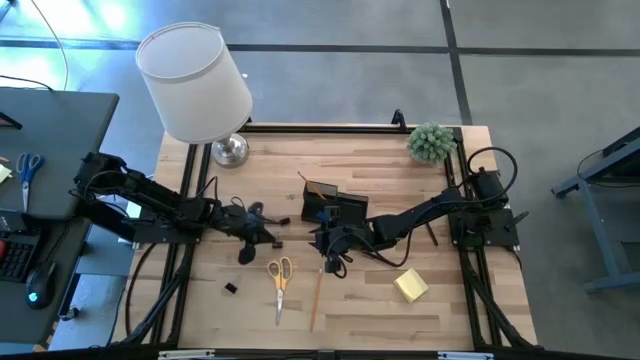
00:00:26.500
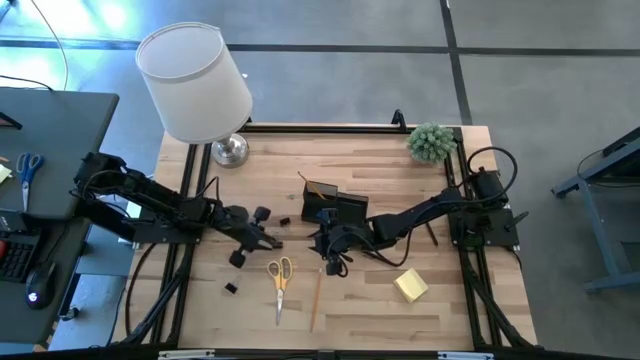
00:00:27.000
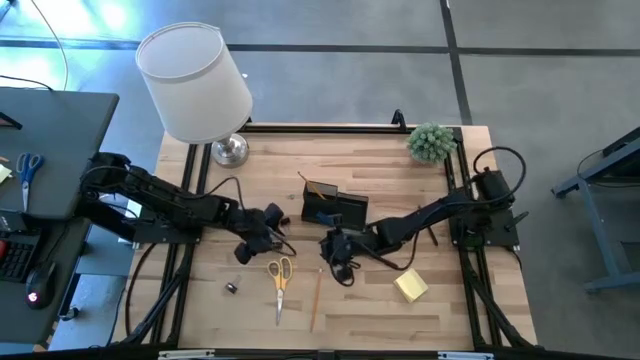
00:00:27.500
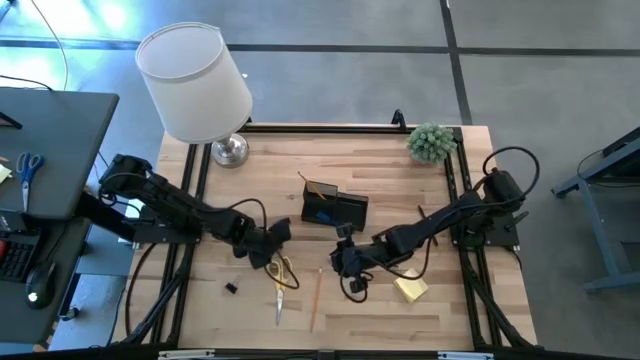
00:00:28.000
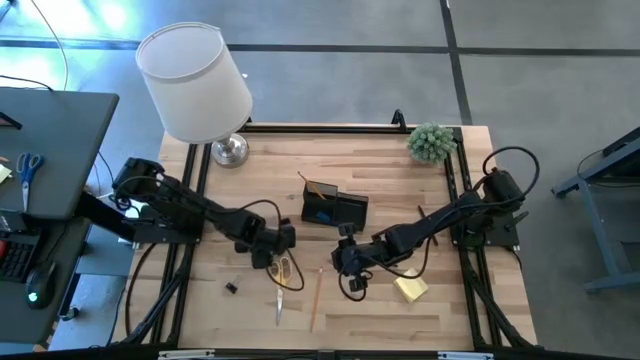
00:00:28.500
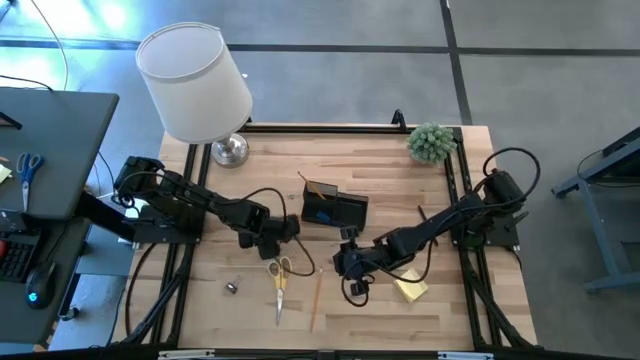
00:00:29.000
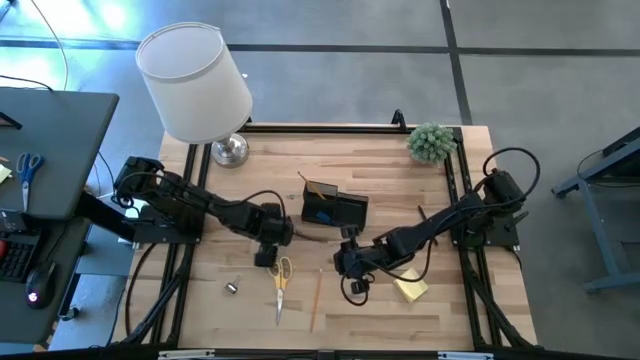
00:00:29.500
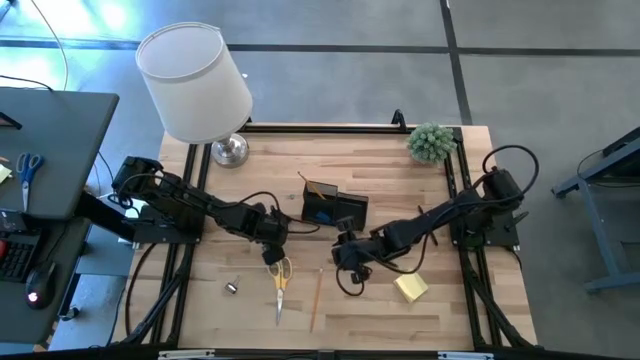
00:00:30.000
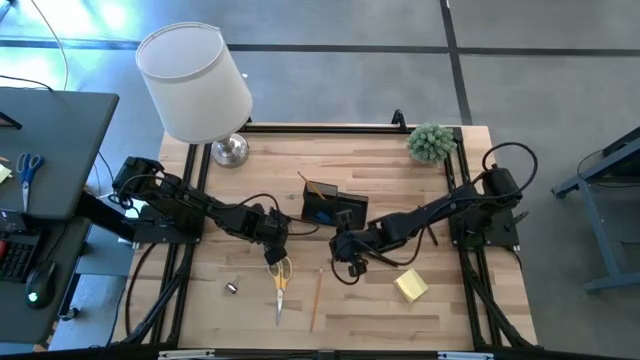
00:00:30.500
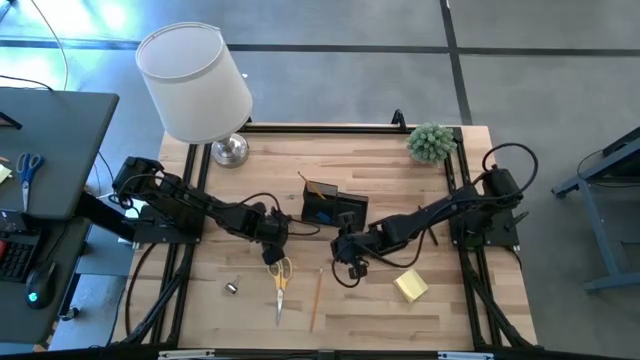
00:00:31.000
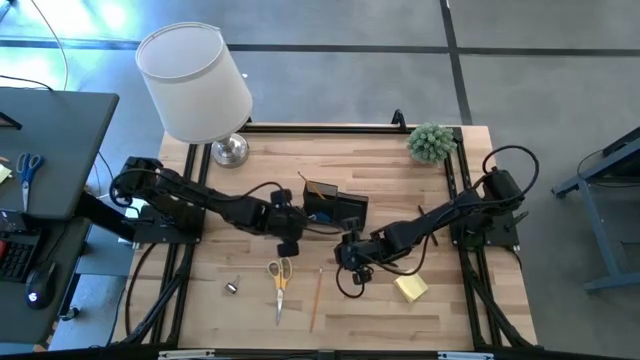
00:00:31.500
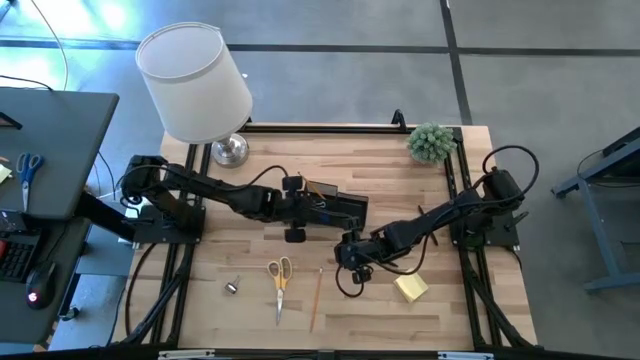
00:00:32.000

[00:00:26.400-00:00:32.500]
Task: Pick and place office supplies into organizer
Put the top left black binder clip into the desk organizer

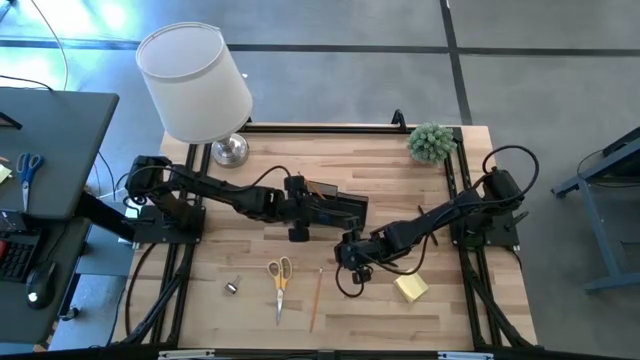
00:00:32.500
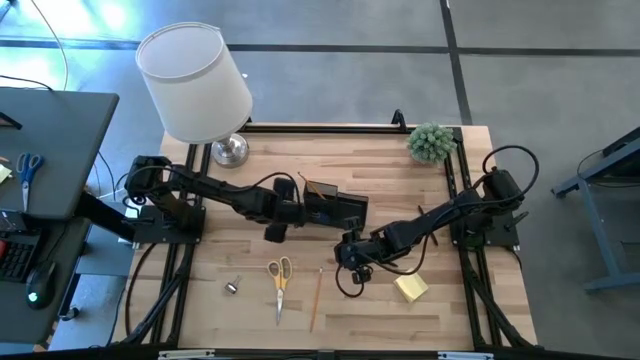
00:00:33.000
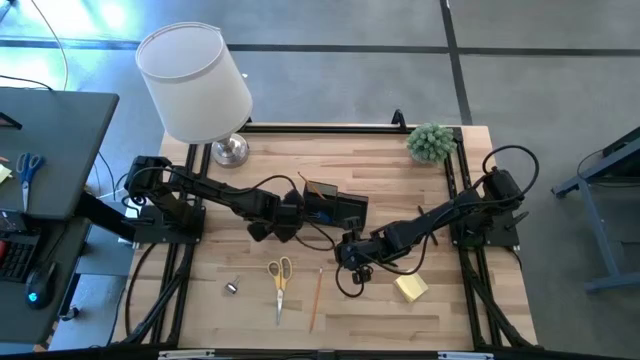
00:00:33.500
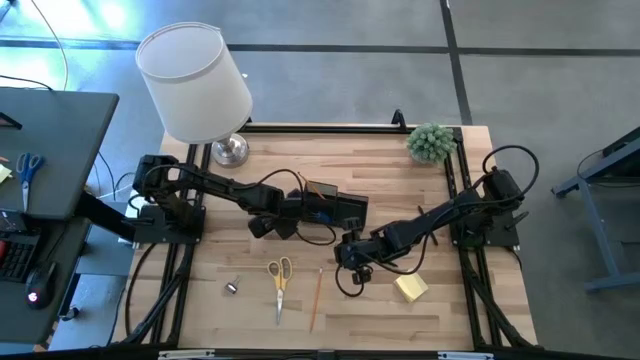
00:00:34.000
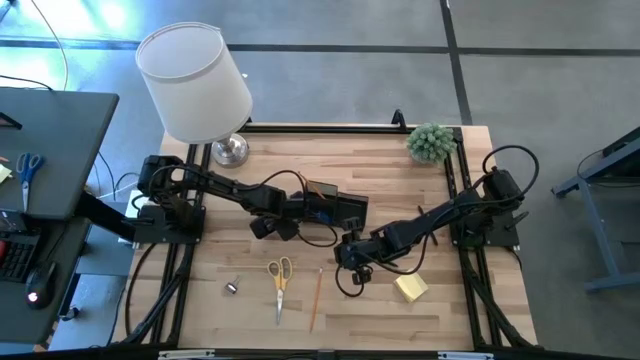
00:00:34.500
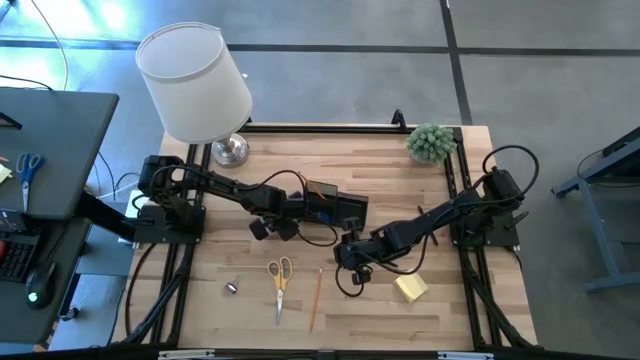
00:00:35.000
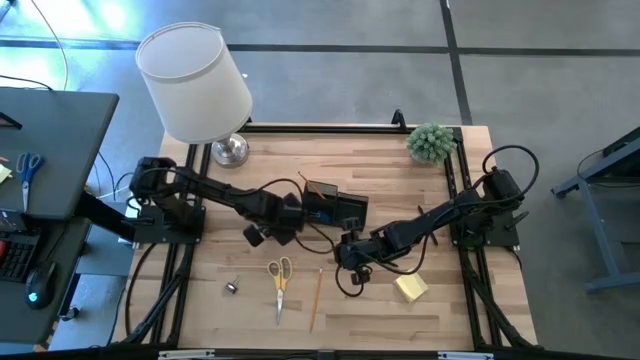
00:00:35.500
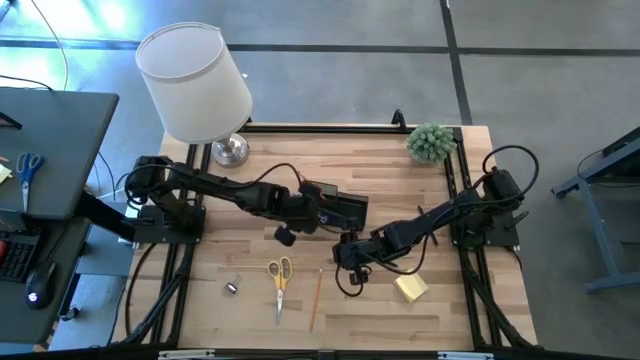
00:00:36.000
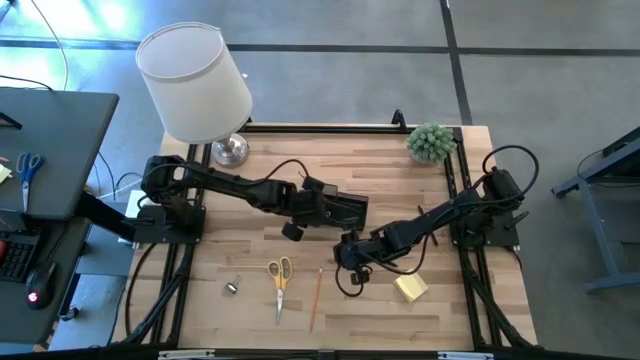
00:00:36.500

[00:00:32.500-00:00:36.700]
Put the top black binder clip into the desk organizer

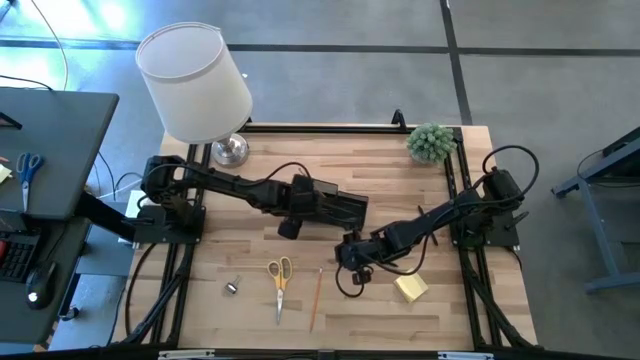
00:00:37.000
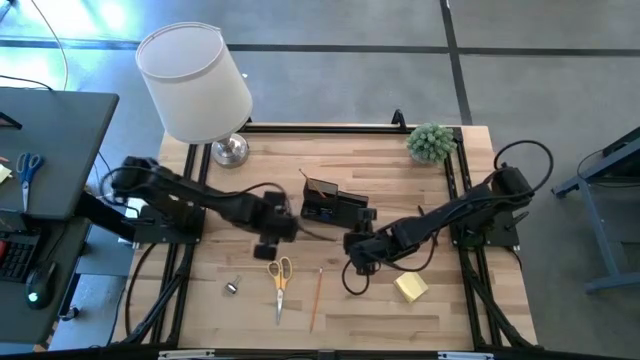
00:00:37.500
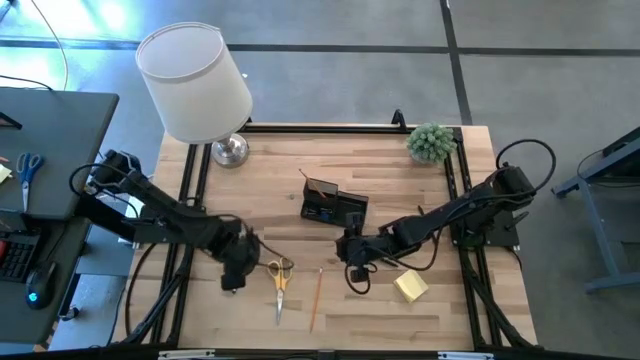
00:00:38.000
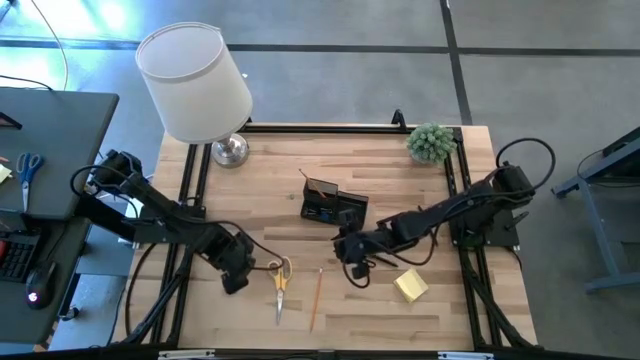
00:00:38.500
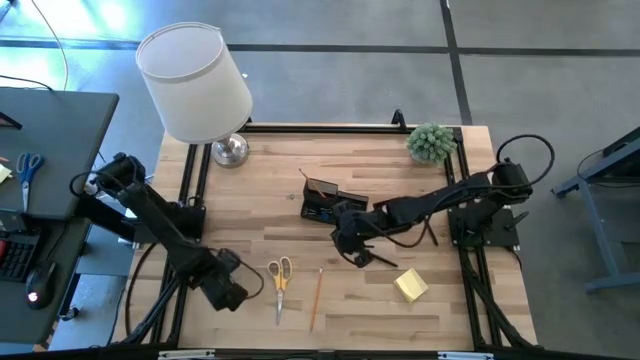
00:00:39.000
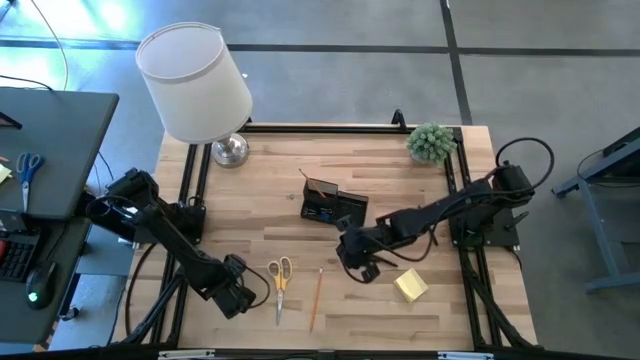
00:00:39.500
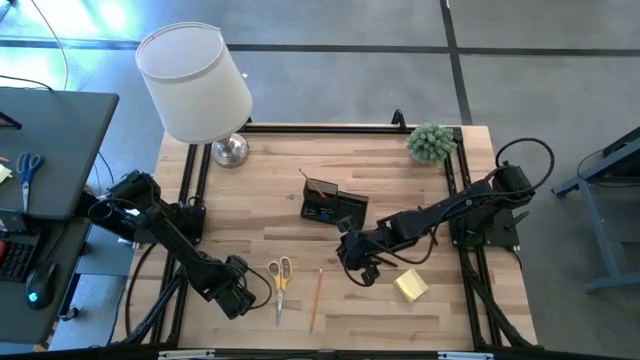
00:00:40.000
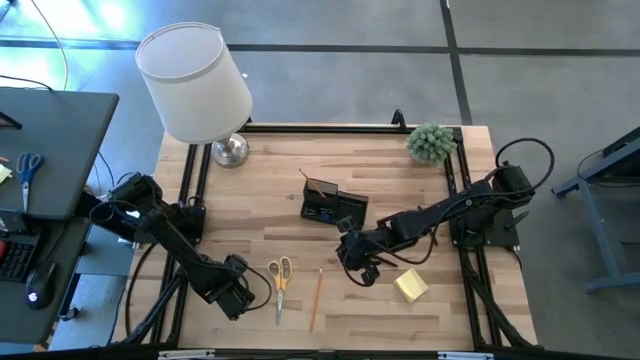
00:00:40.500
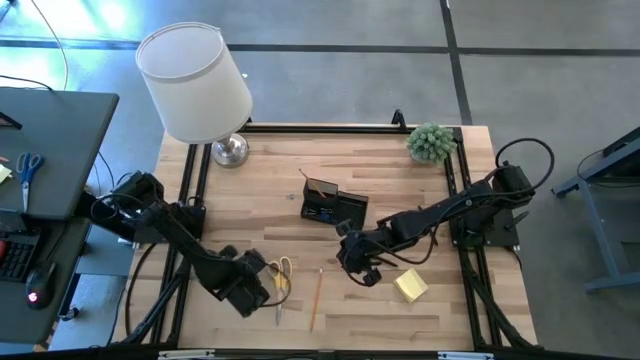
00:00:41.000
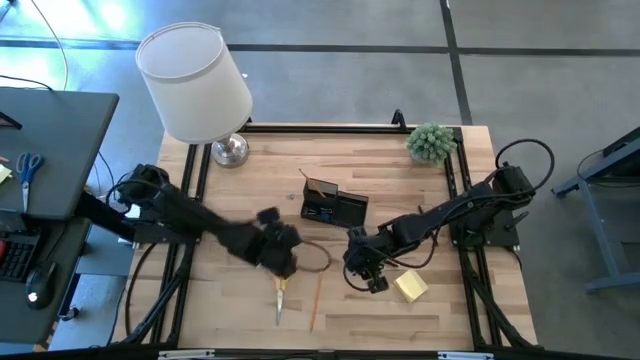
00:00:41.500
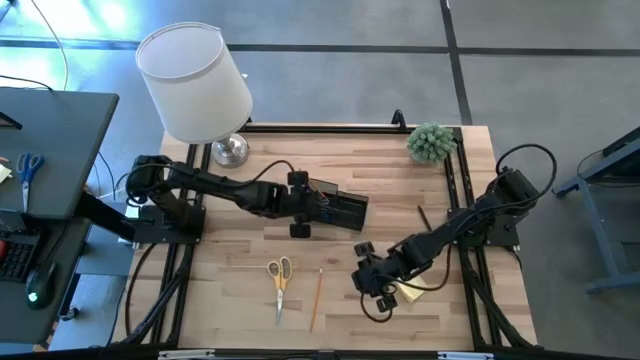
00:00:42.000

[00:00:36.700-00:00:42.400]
Put the black binder clip into the desk organizer

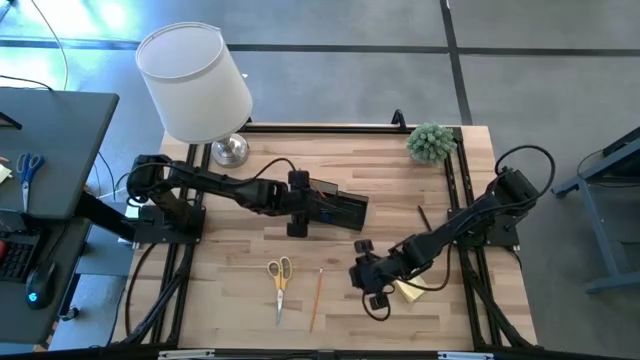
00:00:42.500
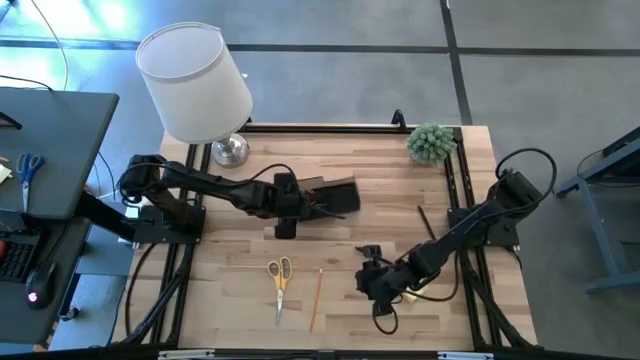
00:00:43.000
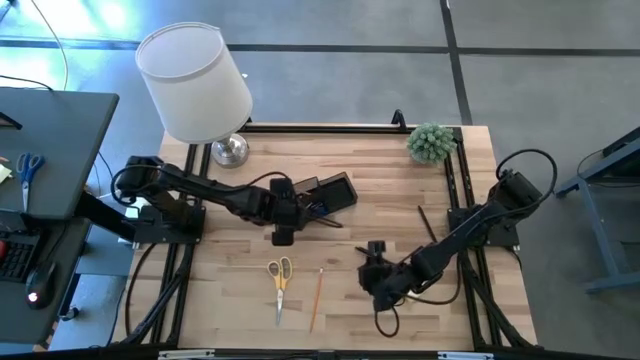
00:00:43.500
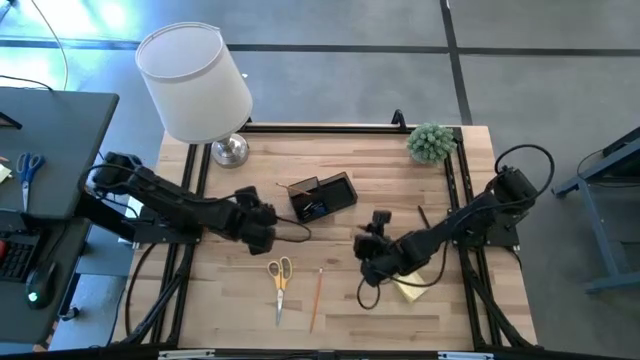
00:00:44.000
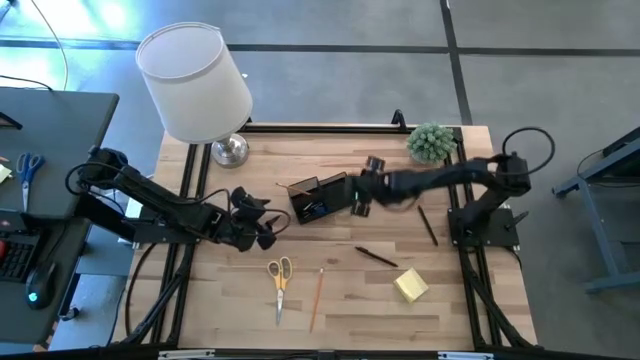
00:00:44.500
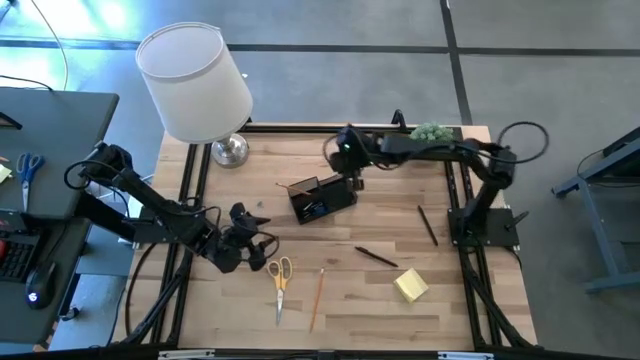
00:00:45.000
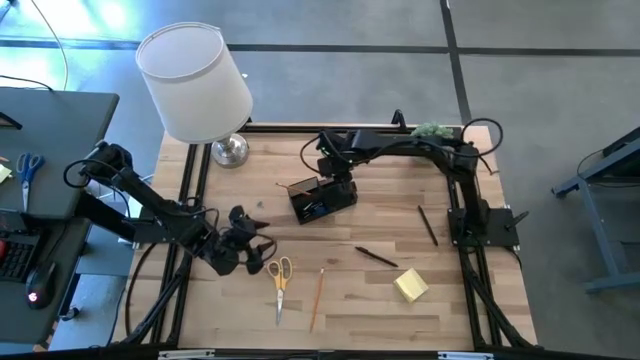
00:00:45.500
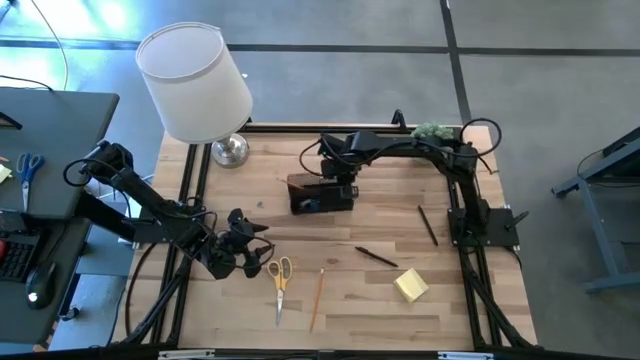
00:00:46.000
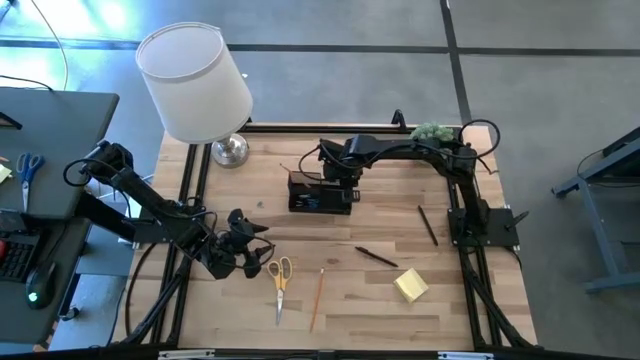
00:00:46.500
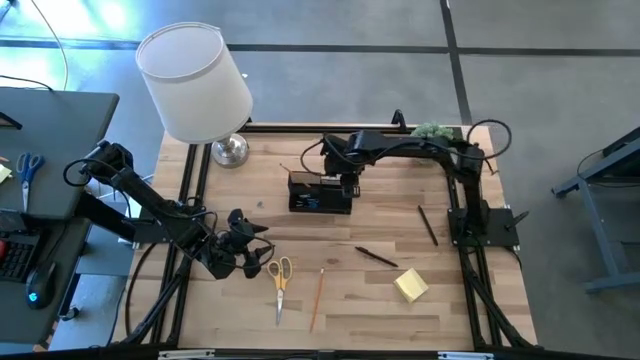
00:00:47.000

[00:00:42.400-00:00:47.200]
Adjust the desk organizer
